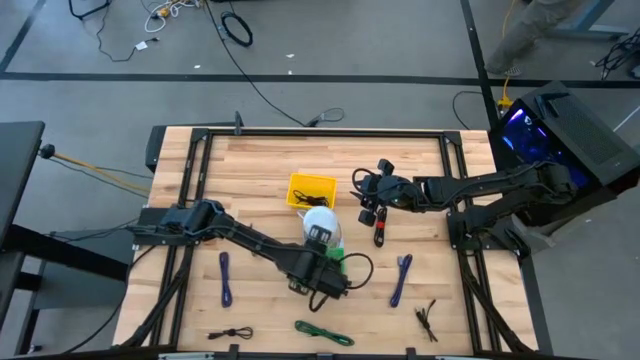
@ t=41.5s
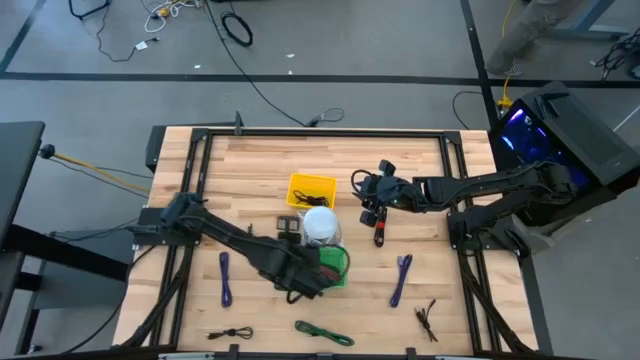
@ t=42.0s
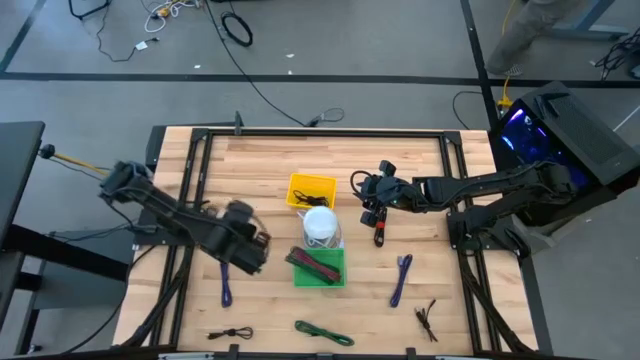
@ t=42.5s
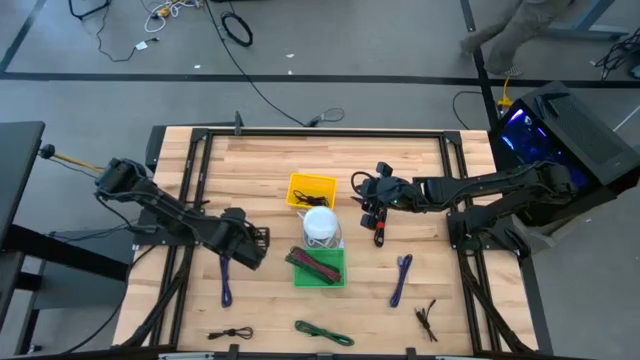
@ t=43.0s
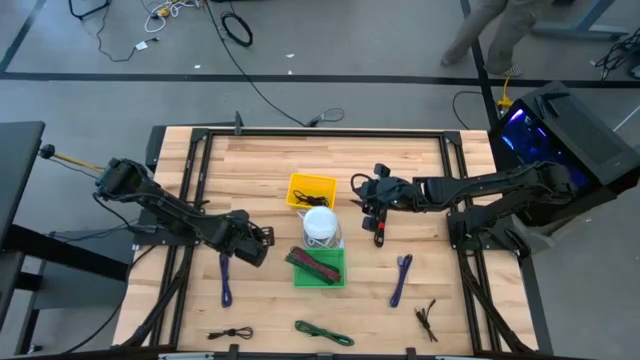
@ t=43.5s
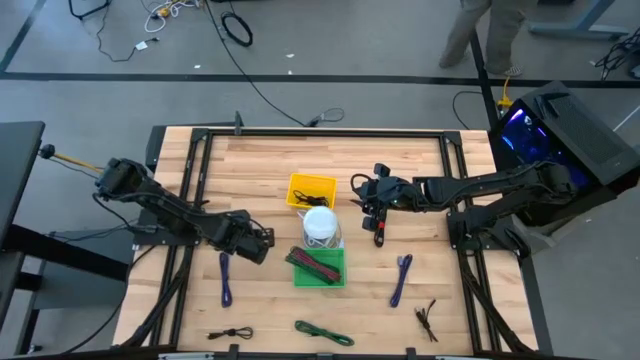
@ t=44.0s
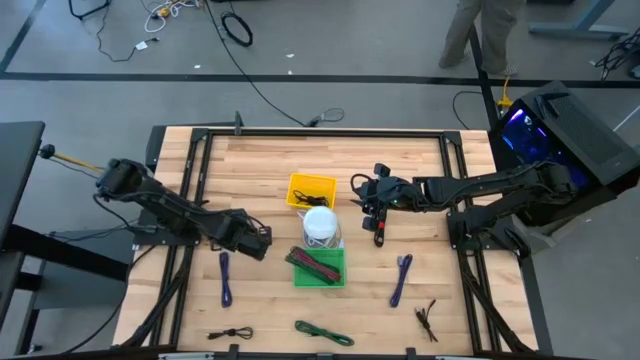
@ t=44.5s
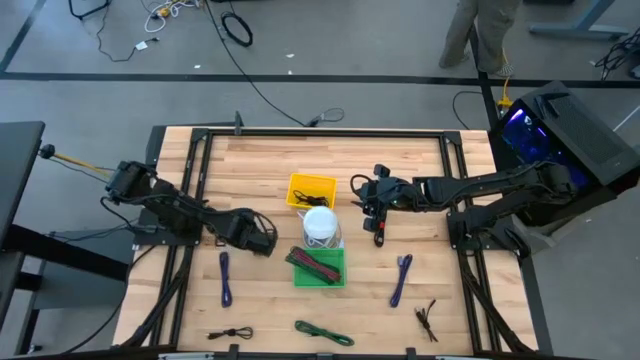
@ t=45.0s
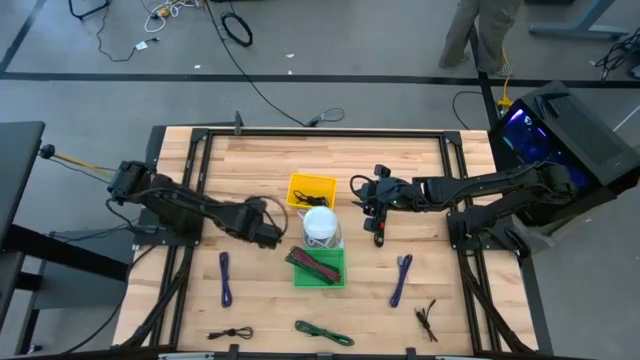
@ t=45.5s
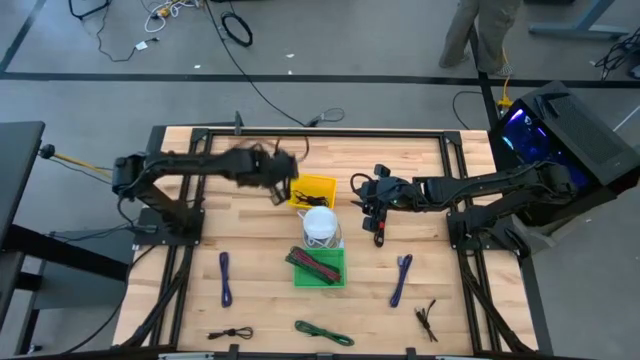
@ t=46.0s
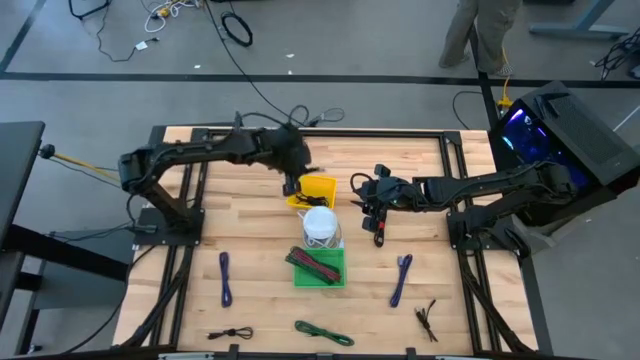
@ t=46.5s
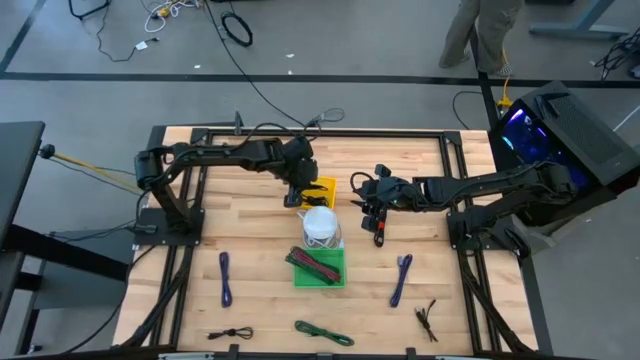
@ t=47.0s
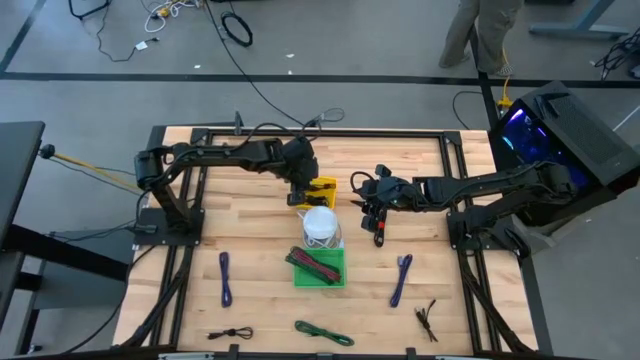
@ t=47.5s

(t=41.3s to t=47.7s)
Task: Pick & Place USB Port
Put the black USB cable into the yellow bin

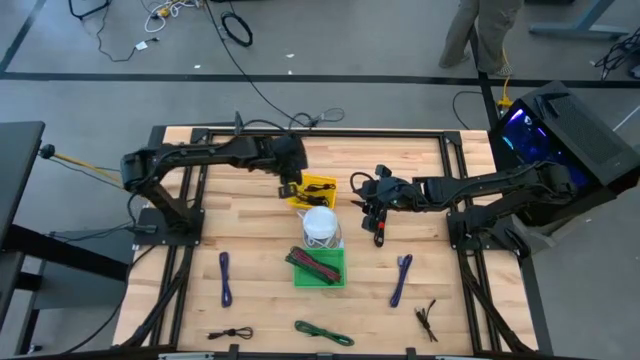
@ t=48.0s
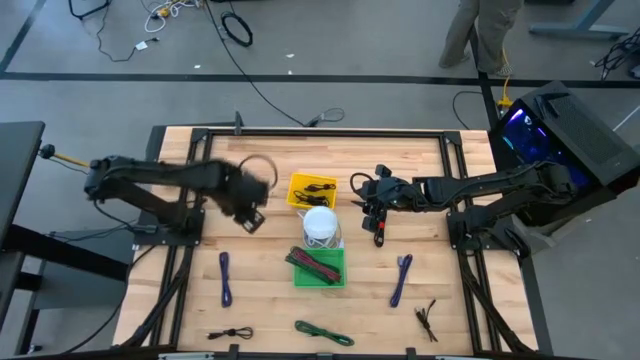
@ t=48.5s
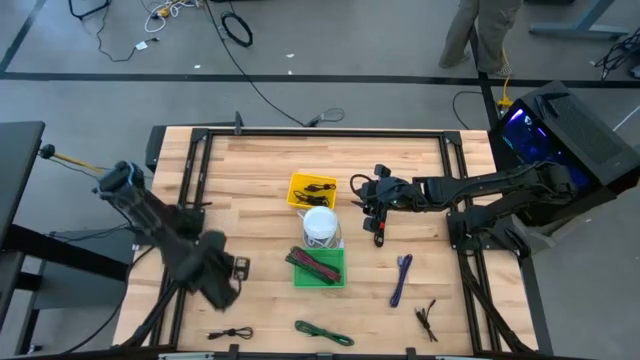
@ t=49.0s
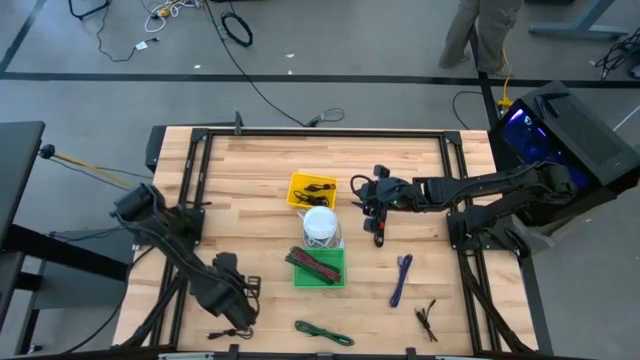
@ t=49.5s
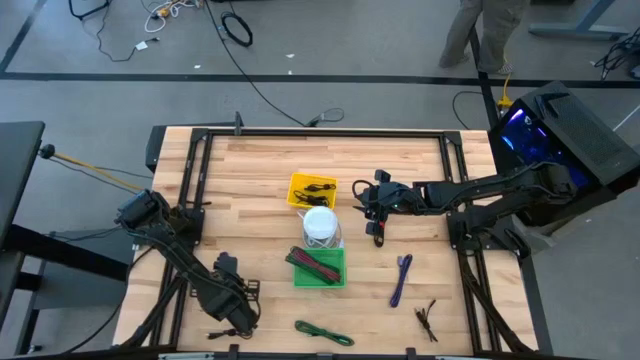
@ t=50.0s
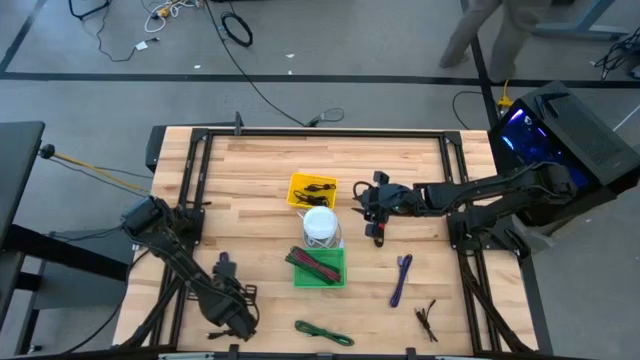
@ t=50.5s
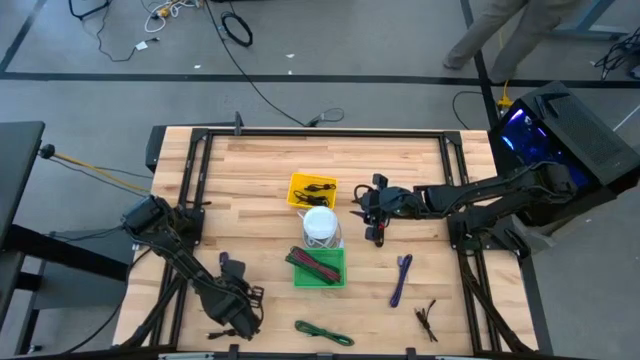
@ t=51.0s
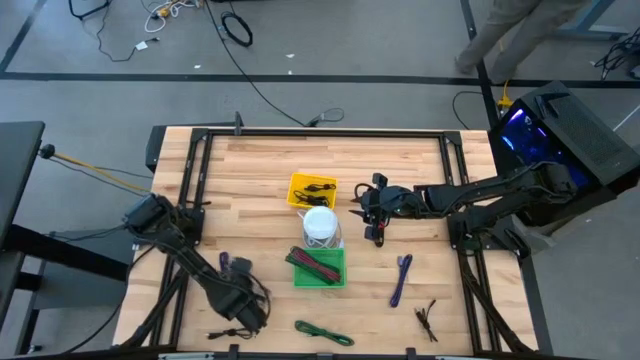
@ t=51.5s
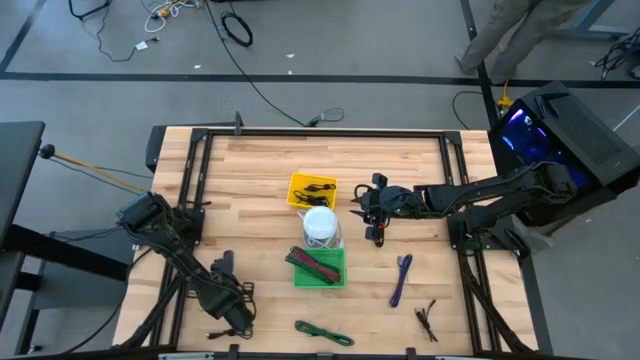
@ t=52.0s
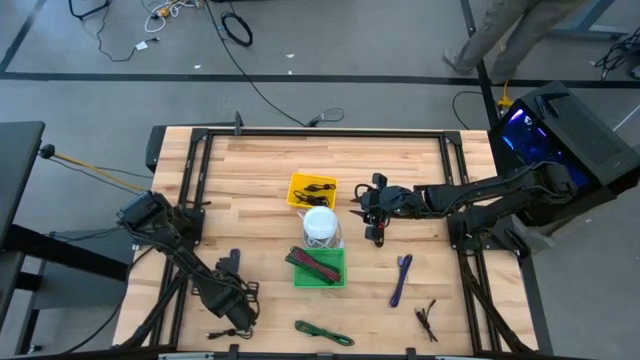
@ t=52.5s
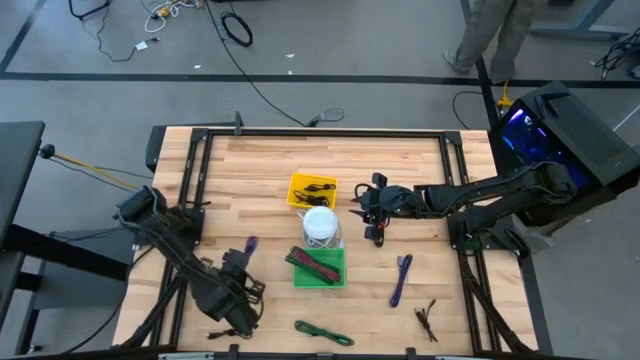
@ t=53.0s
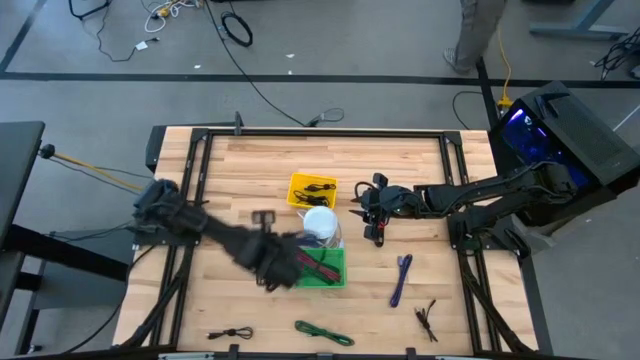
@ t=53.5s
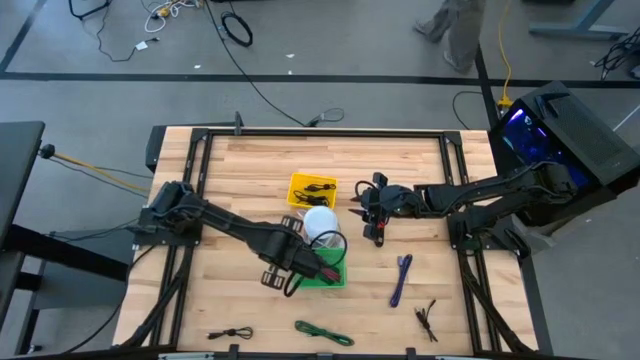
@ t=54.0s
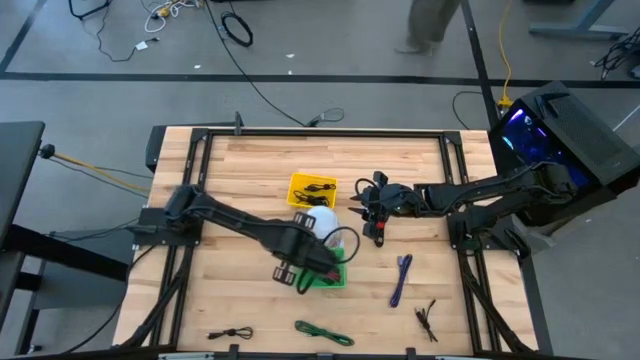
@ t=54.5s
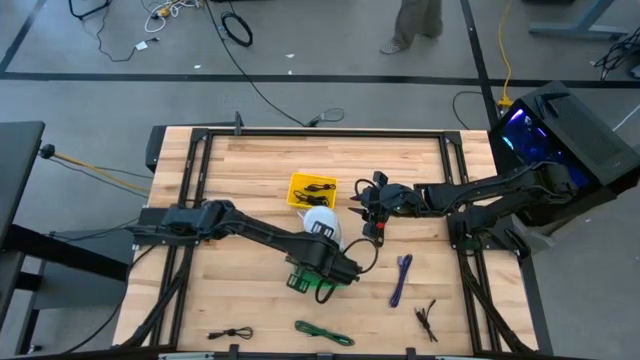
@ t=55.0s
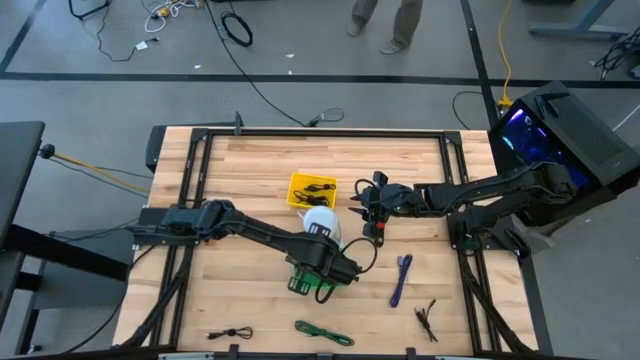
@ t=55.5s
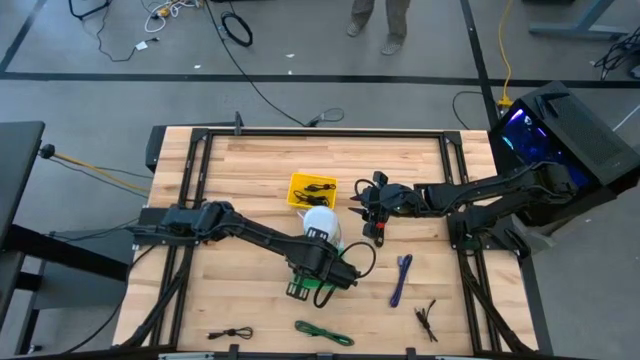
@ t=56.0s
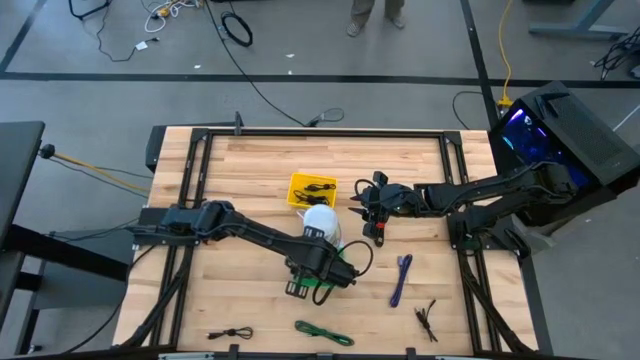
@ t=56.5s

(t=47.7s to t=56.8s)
Put the left violet and black USB cable into the green bin

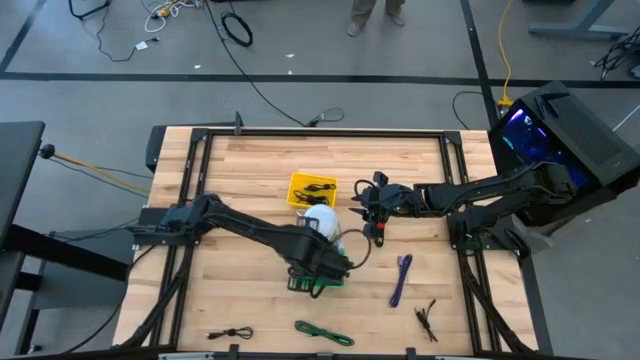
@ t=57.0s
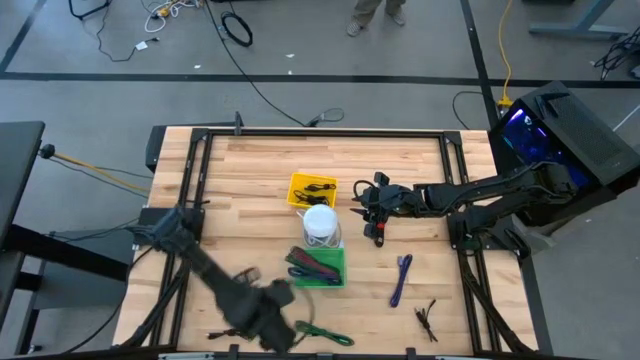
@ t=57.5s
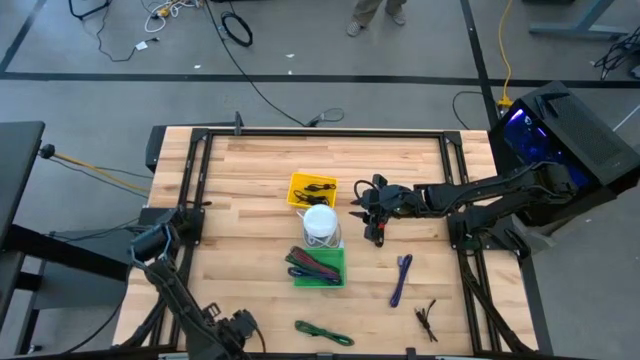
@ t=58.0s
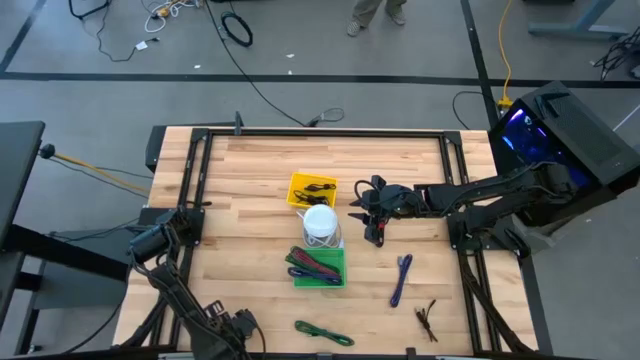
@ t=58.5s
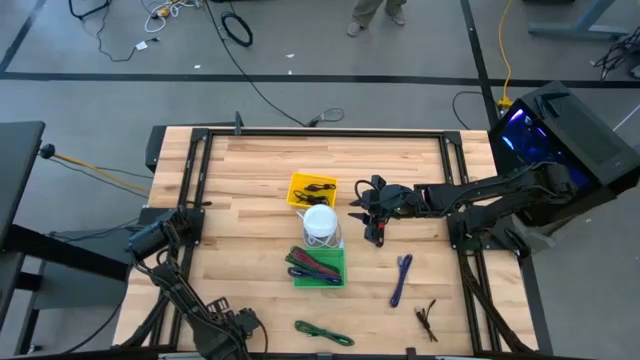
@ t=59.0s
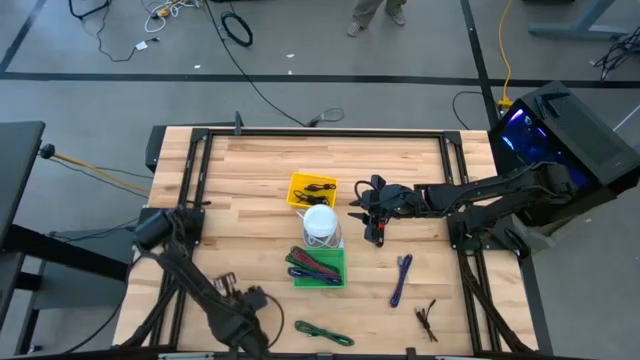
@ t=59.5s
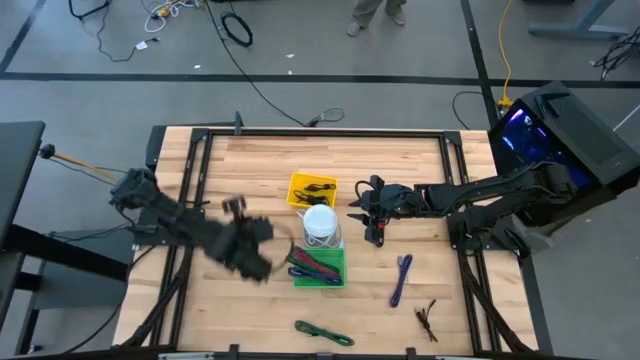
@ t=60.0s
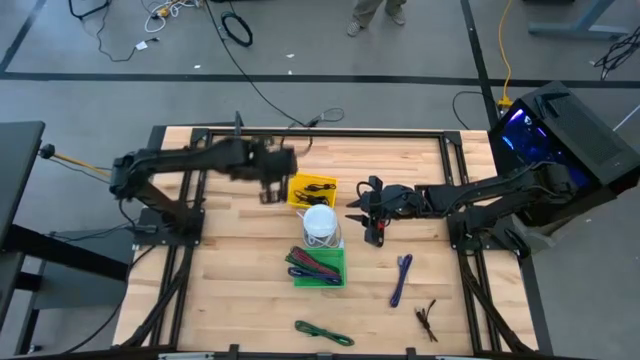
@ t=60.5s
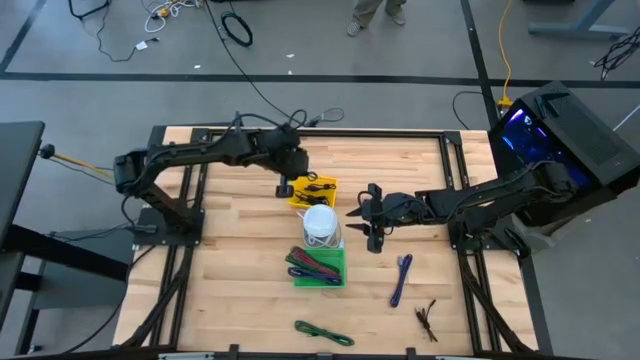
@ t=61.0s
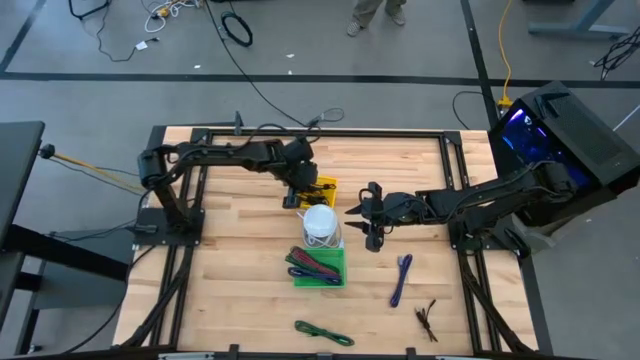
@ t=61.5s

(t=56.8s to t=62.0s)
Put the black USB cable into the yellow bin
